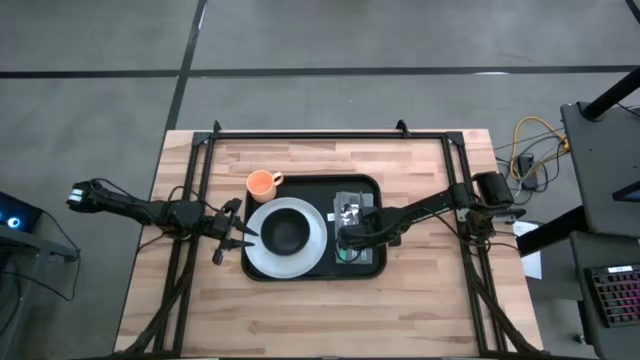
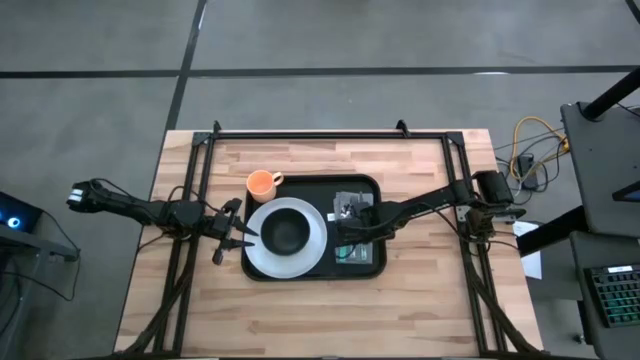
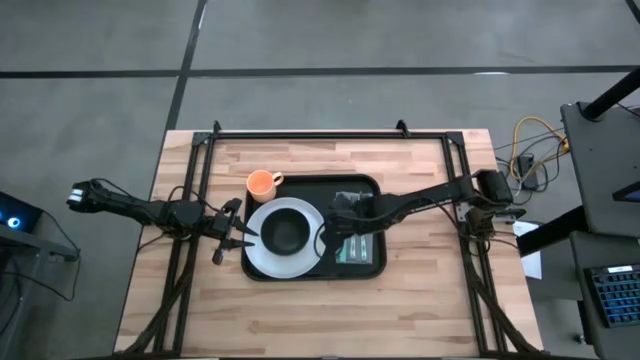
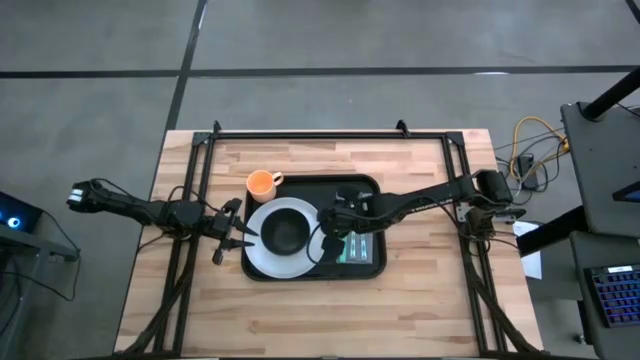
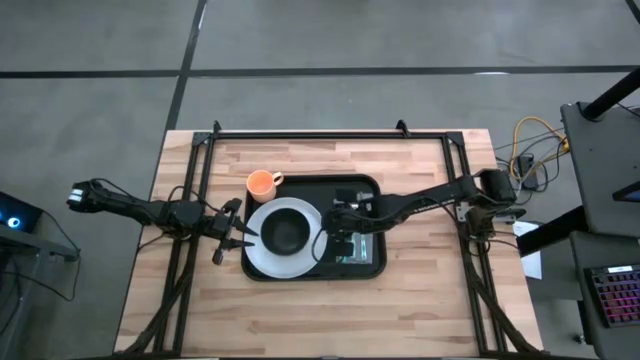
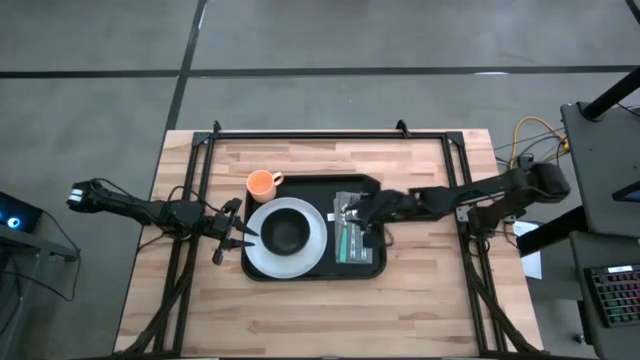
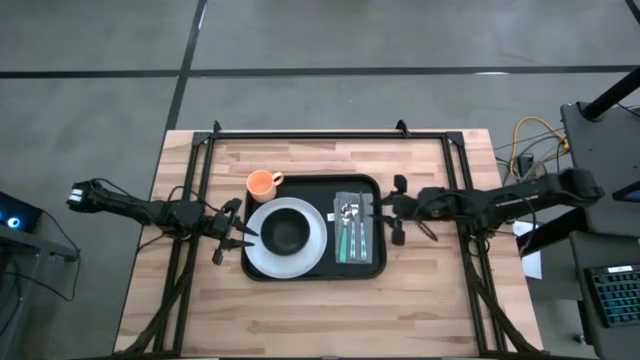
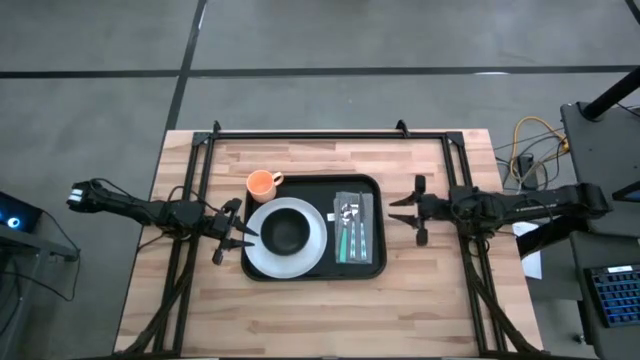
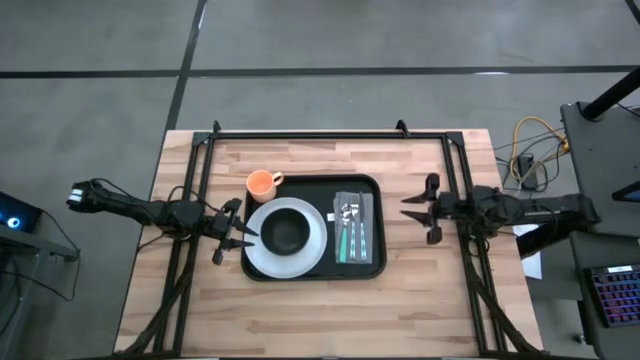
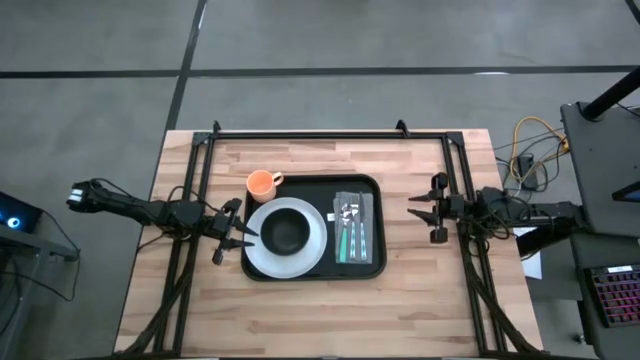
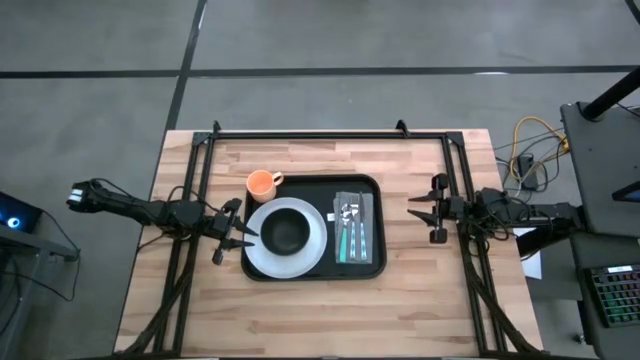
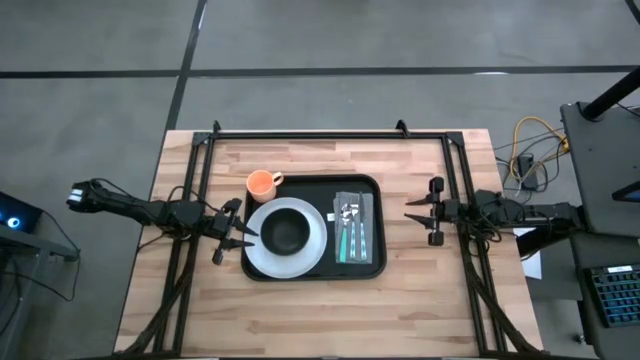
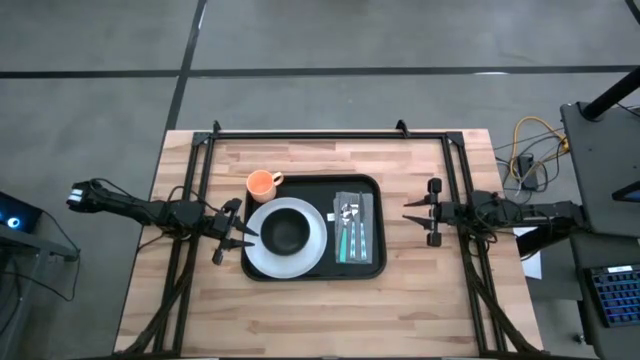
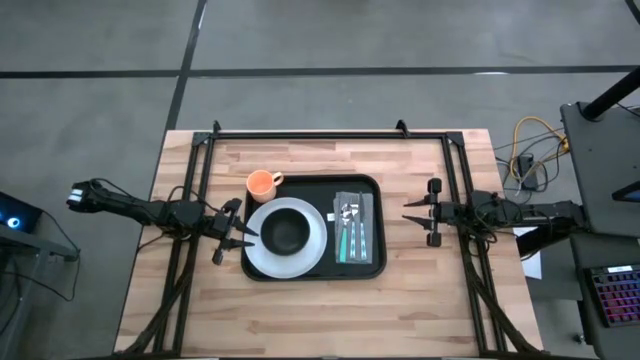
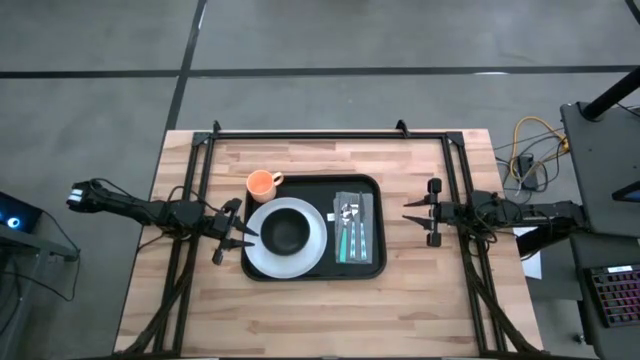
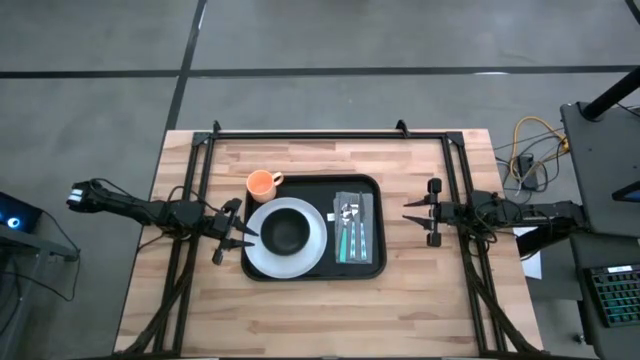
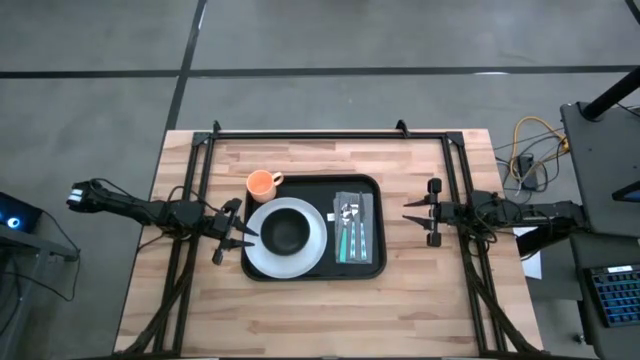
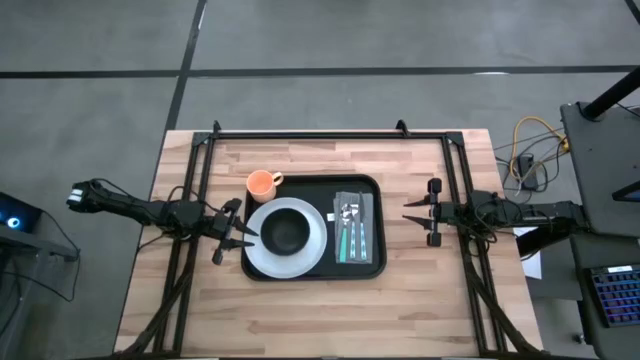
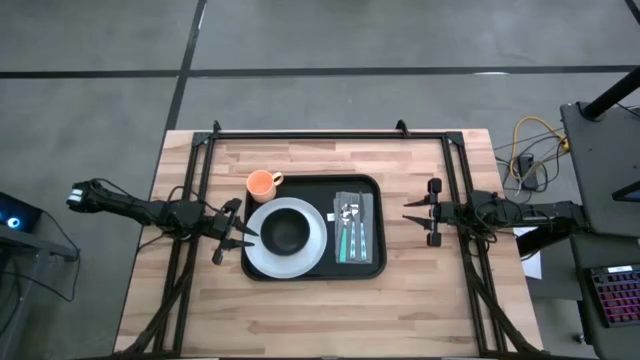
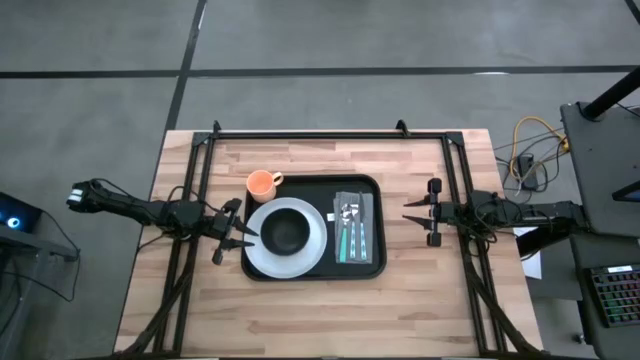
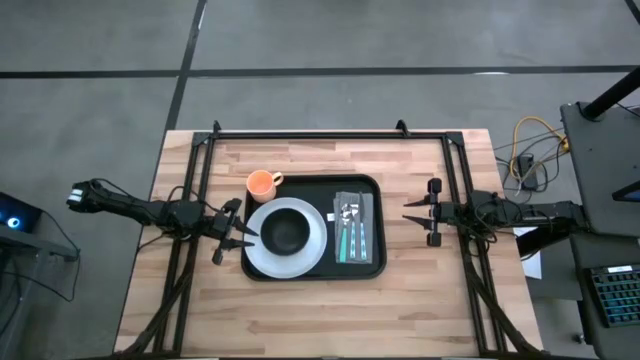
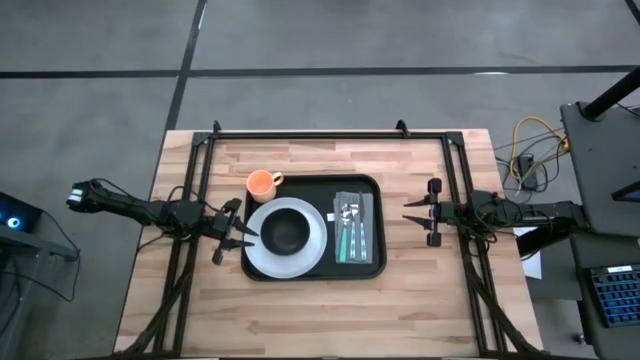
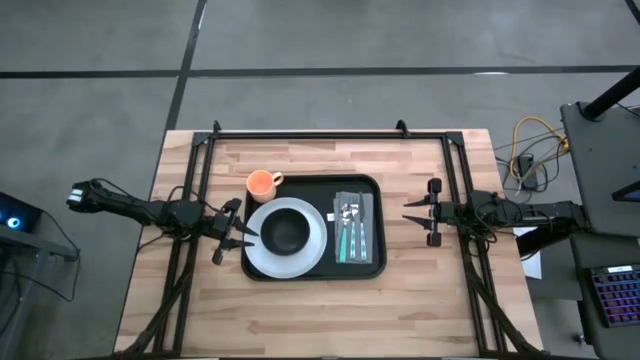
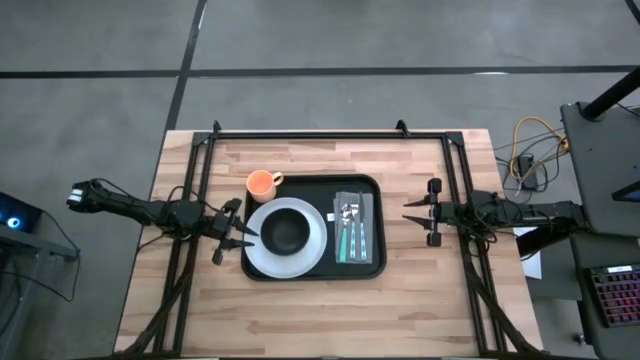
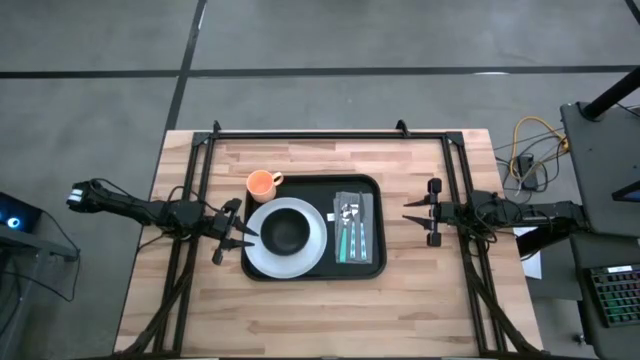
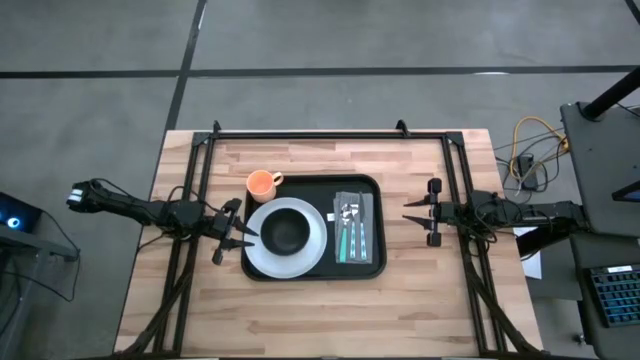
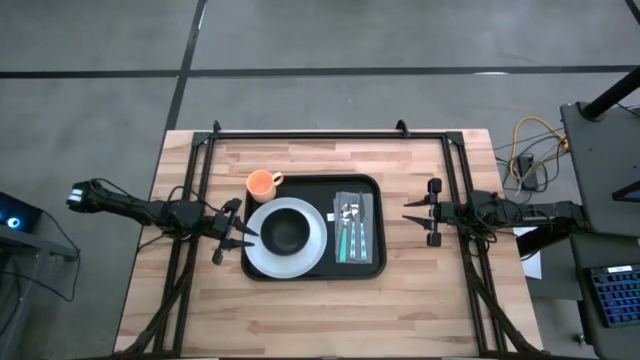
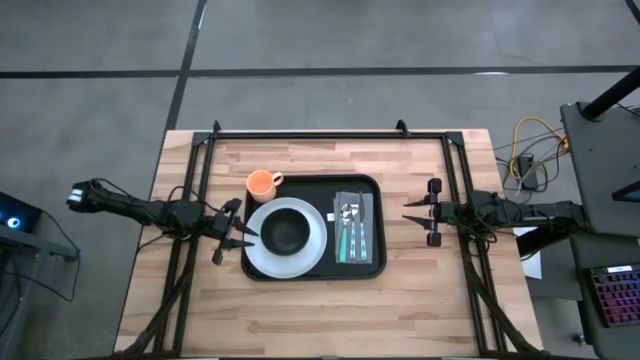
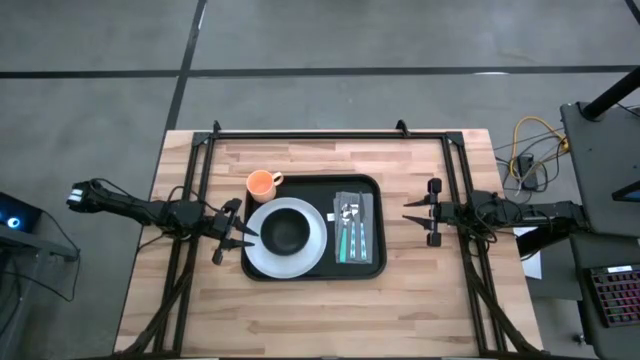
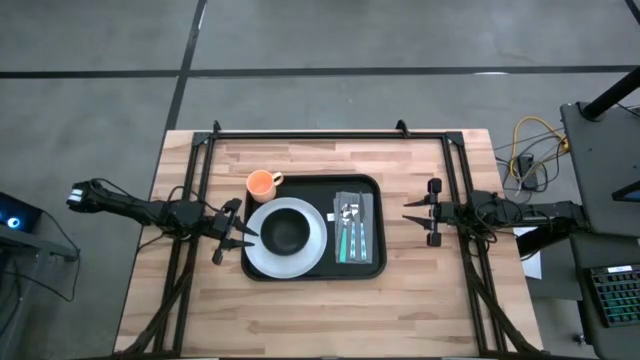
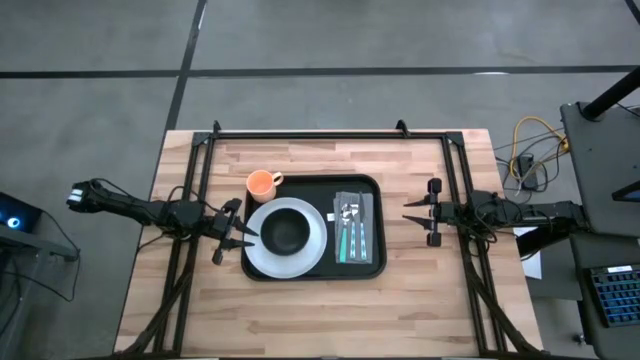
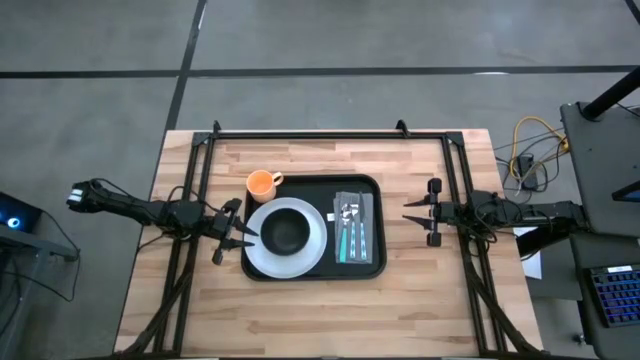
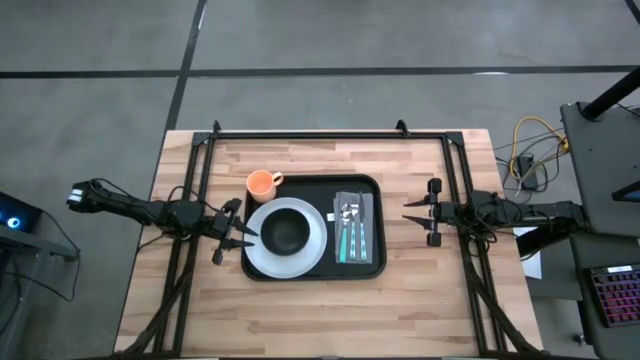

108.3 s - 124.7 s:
Task: Set up tray
Return to Home Position

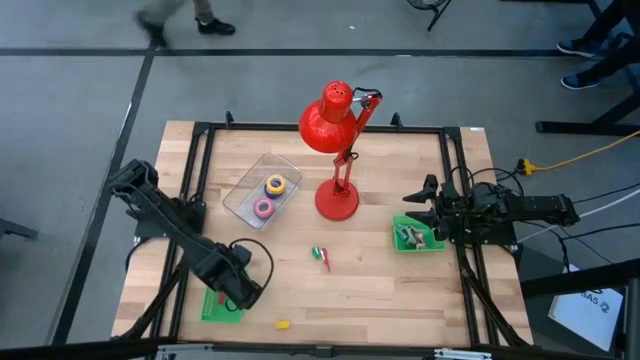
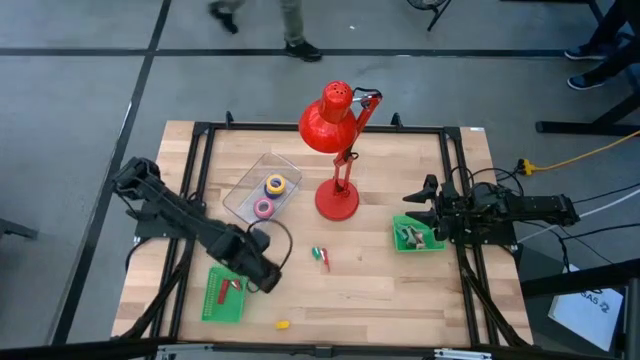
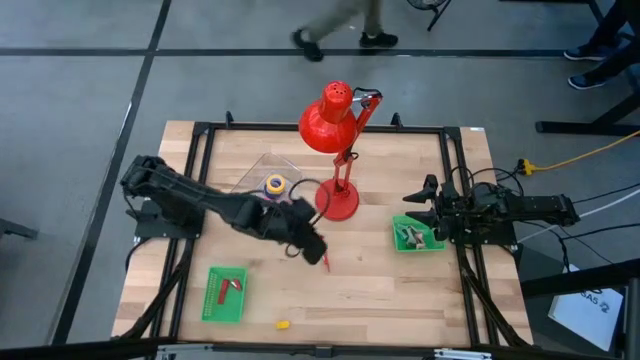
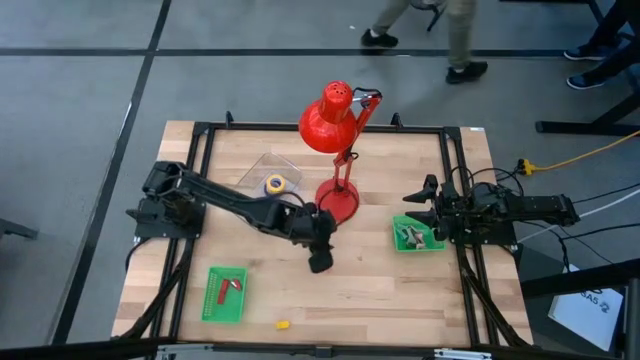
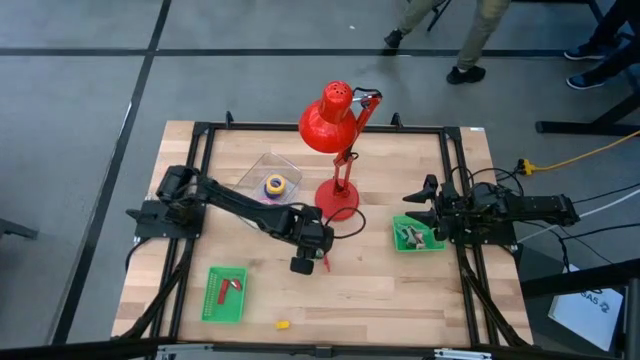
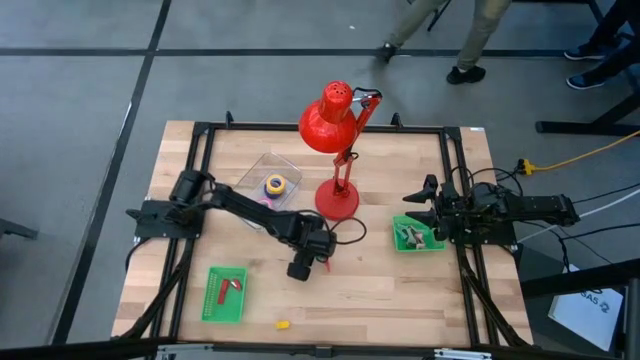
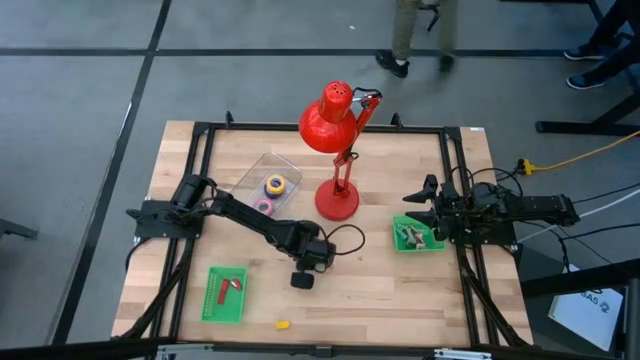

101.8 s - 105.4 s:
Task: Pick and place Stapler, Stapler remover, tape
Put the green stapler into the bottom green basket

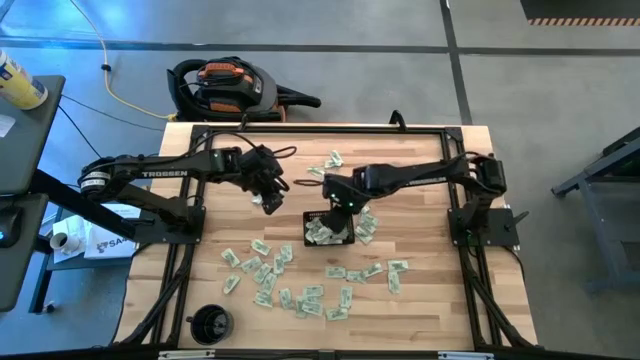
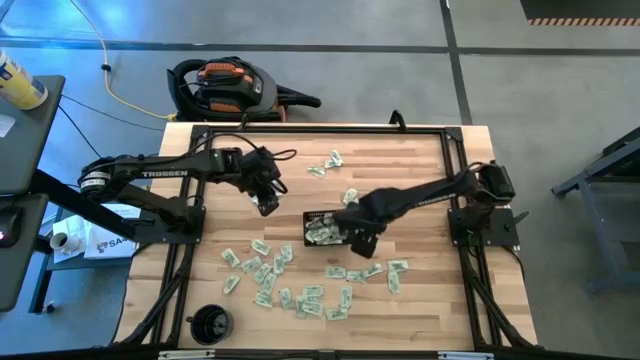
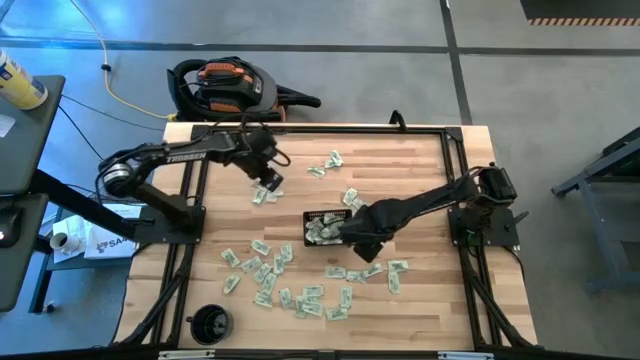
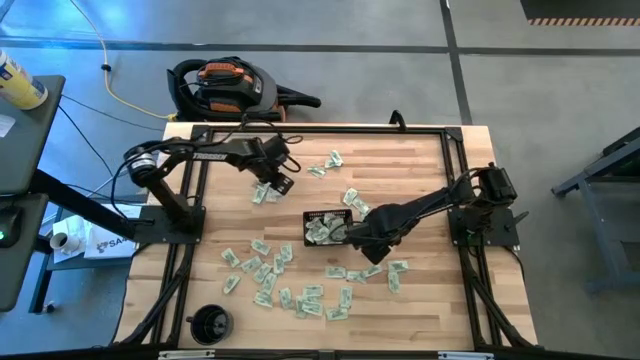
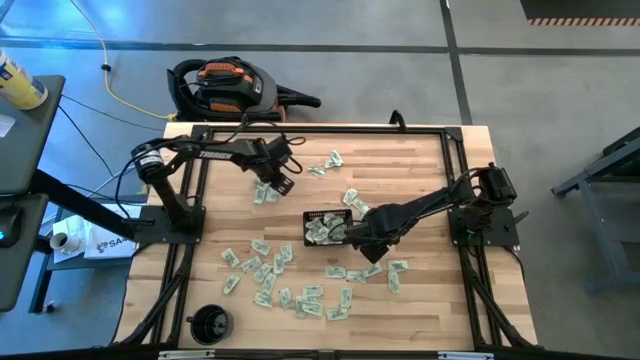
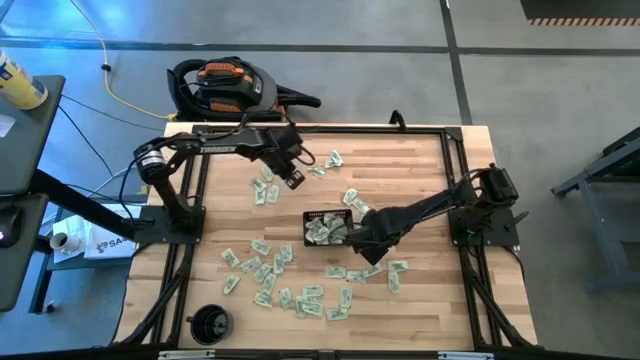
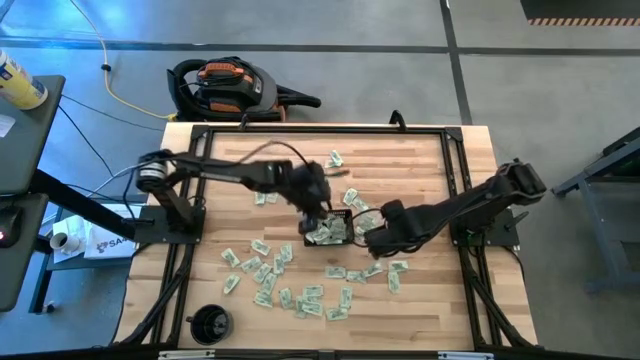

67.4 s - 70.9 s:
Task: Pick and place Stevia / Truvia into bins
Put the green stevia packet into the black basket
